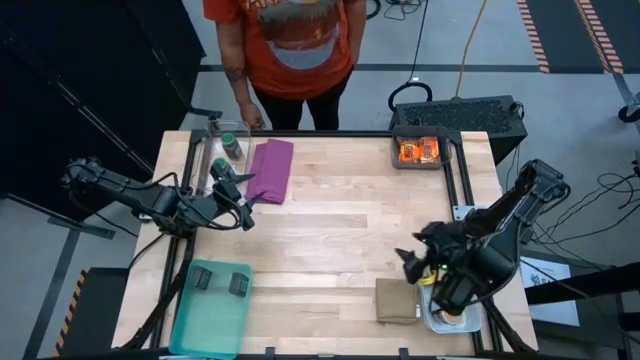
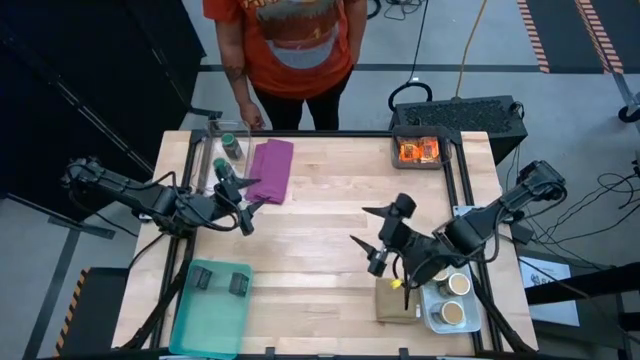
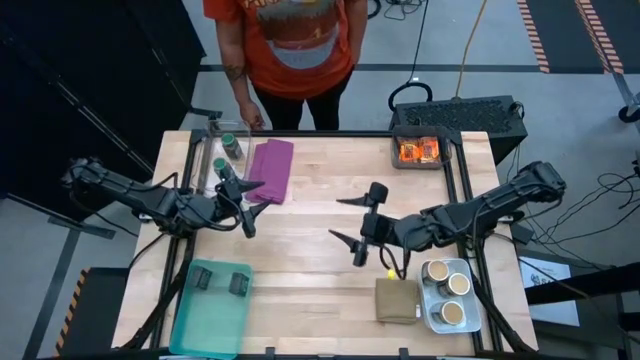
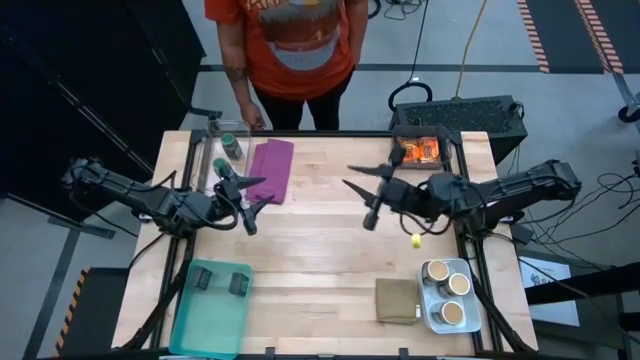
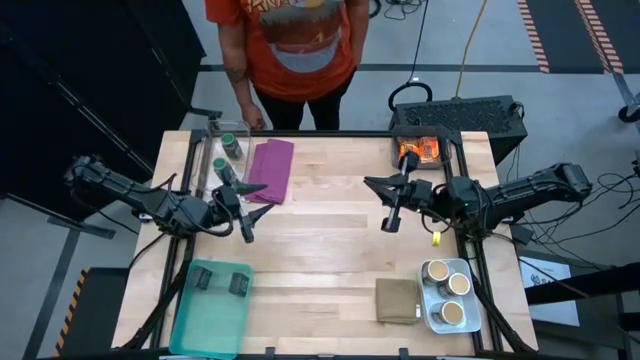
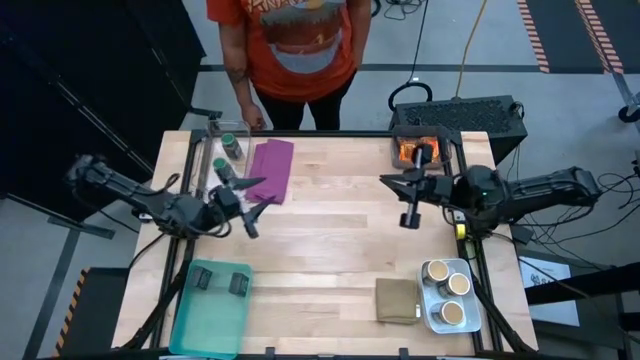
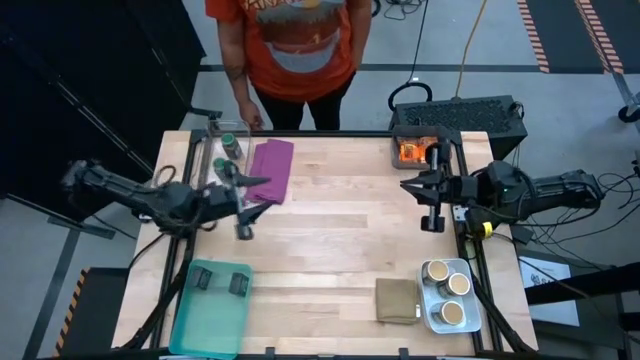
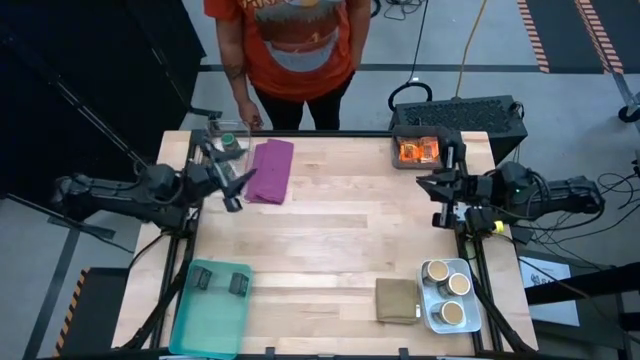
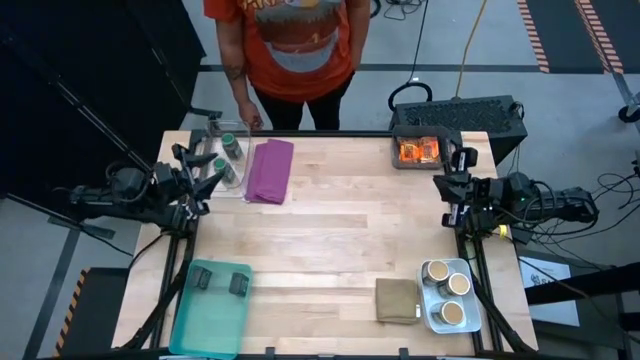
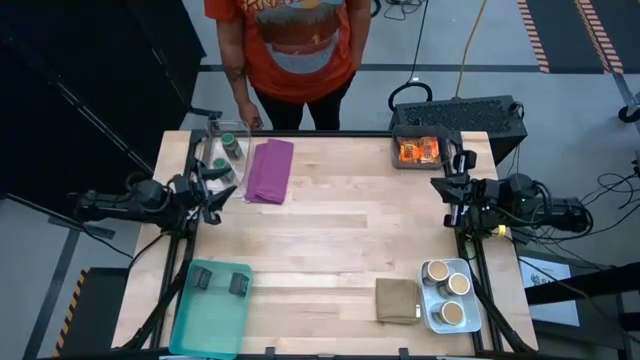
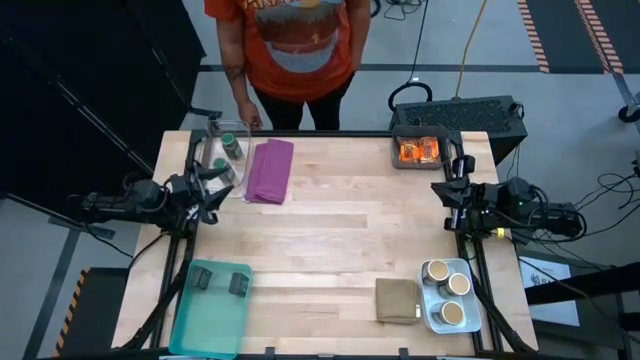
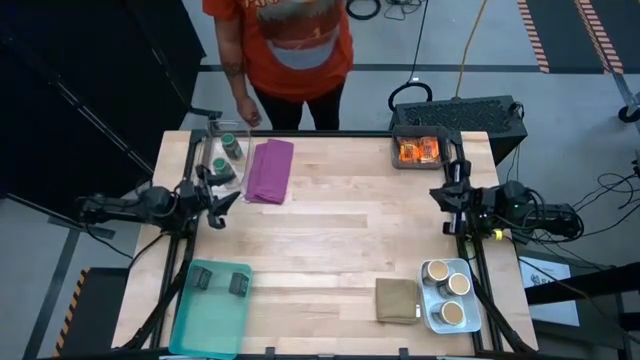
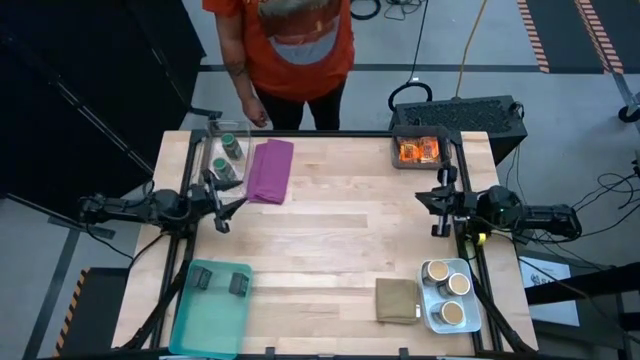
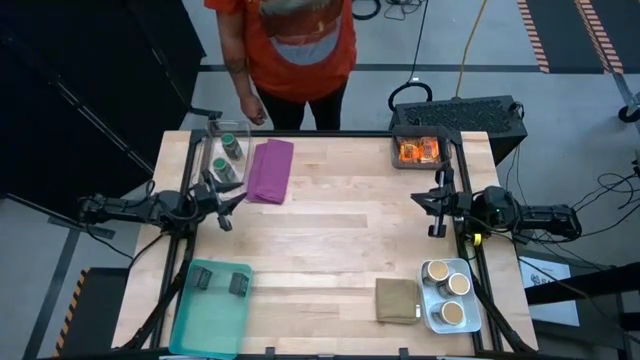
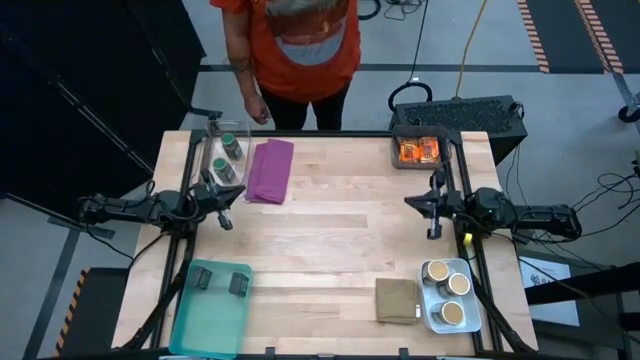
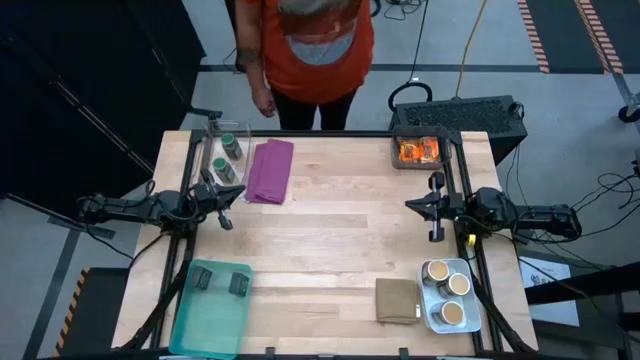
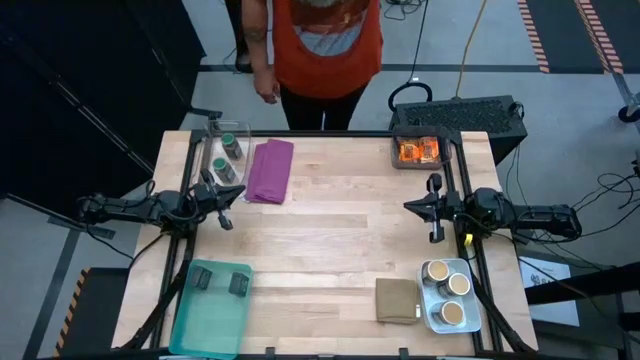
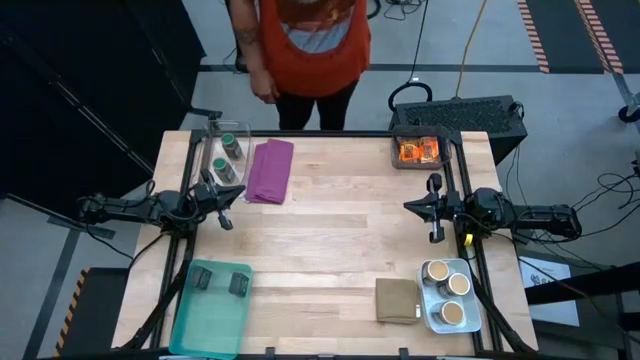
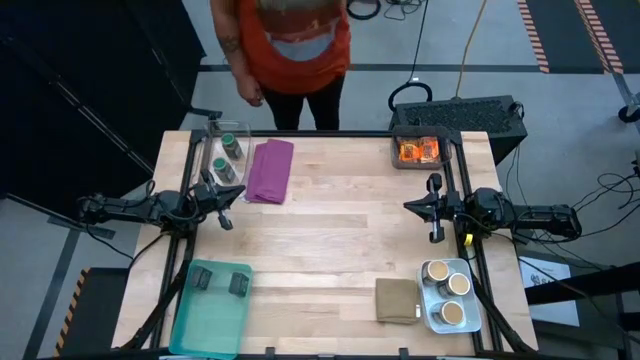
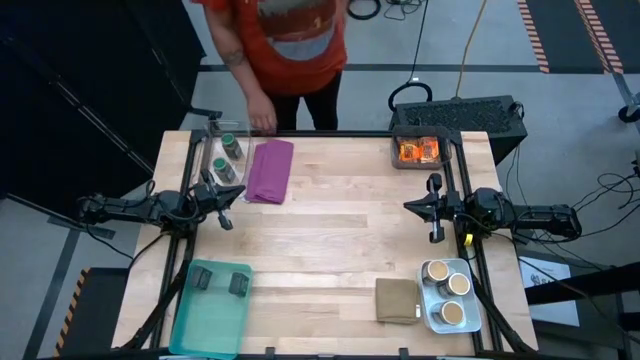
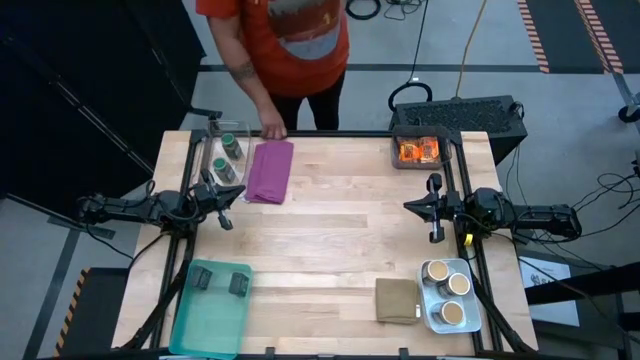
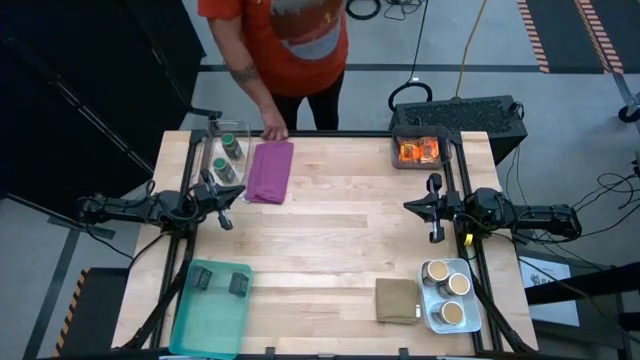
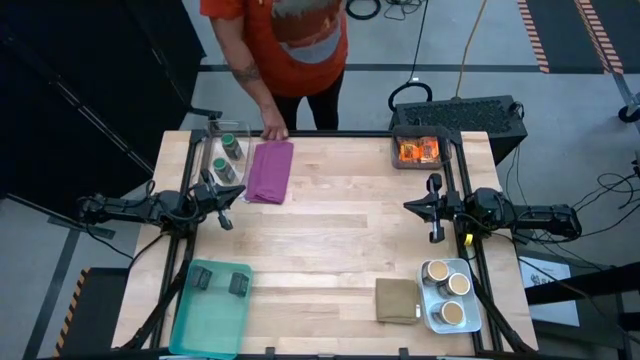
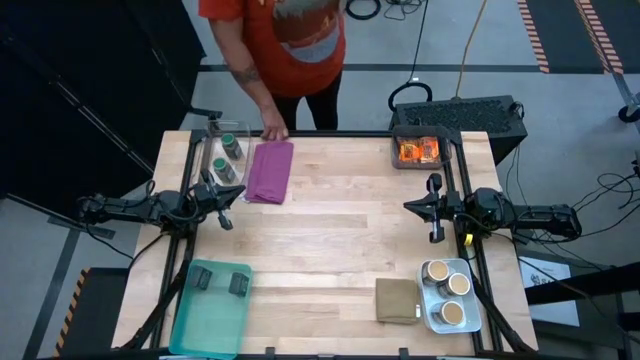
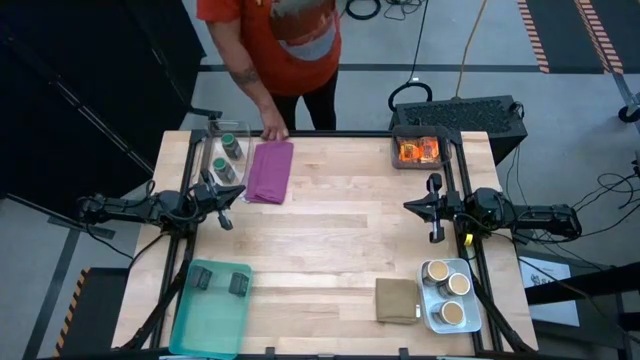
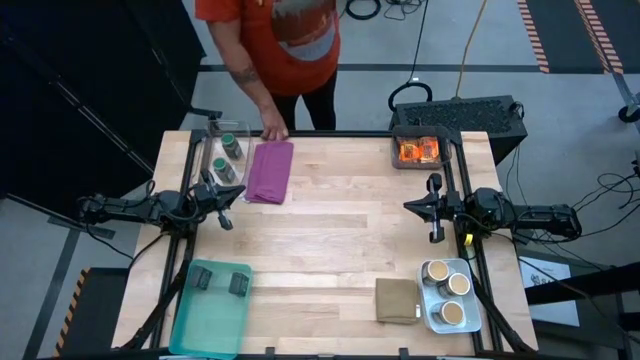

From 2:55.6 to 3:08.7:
Task: Sort spices by type
Return to Home Position

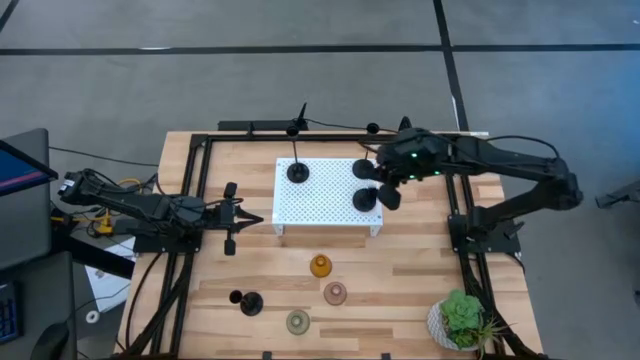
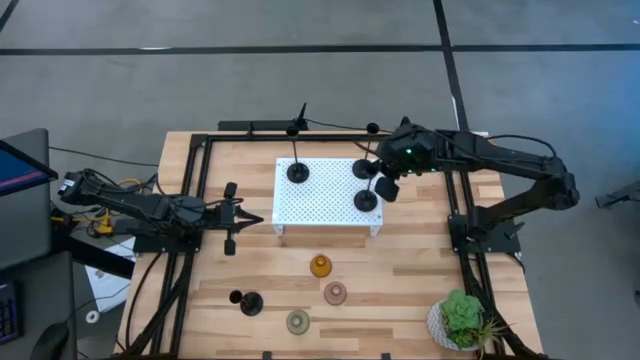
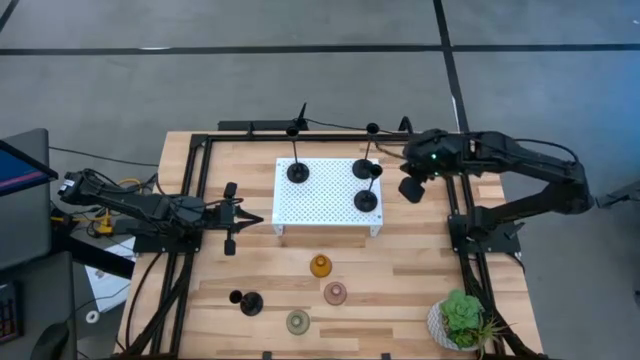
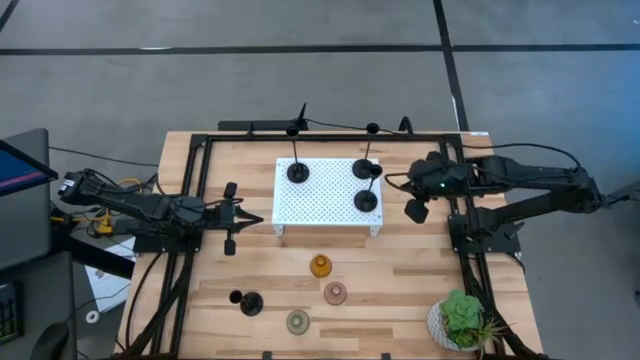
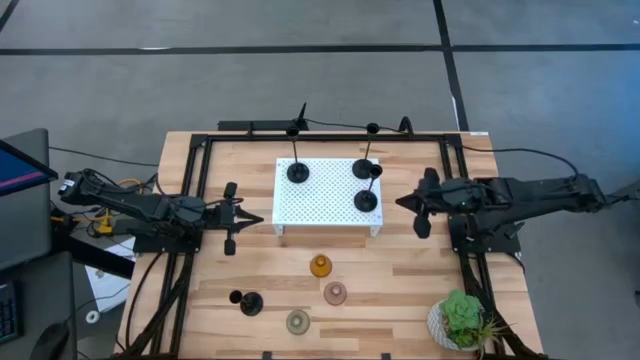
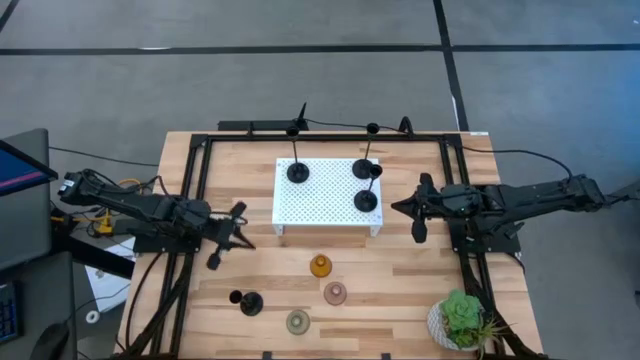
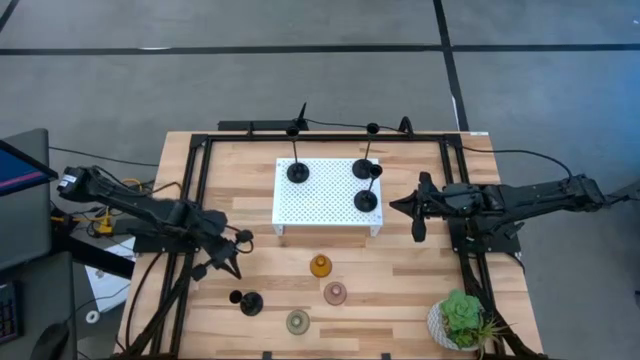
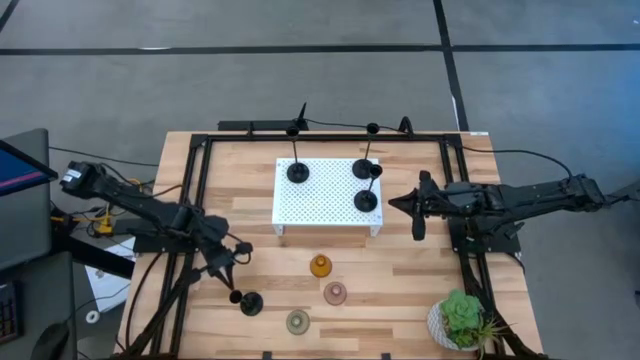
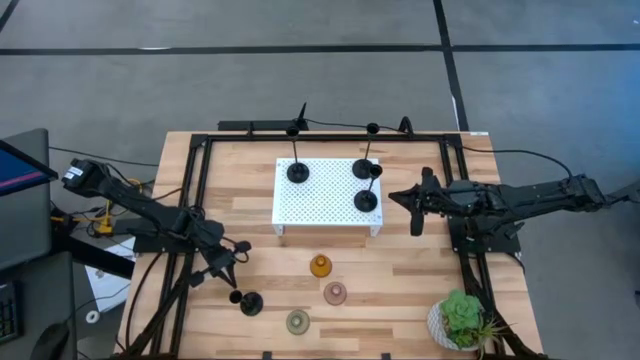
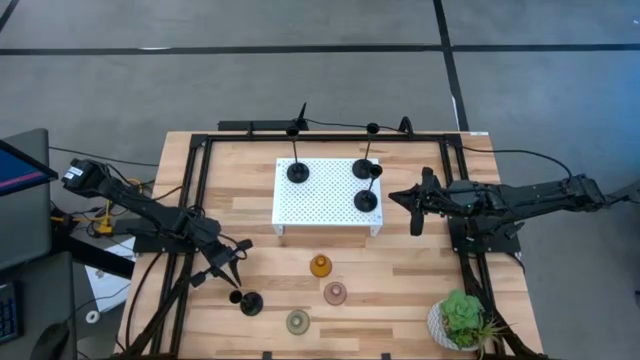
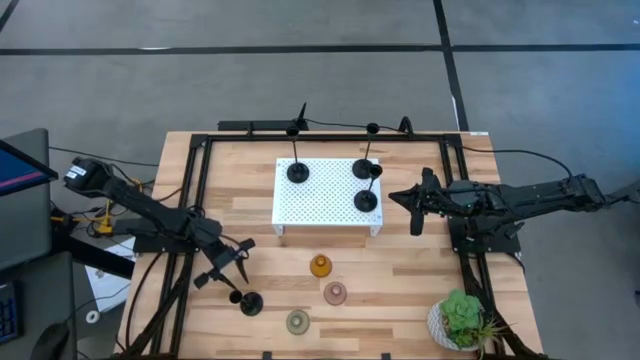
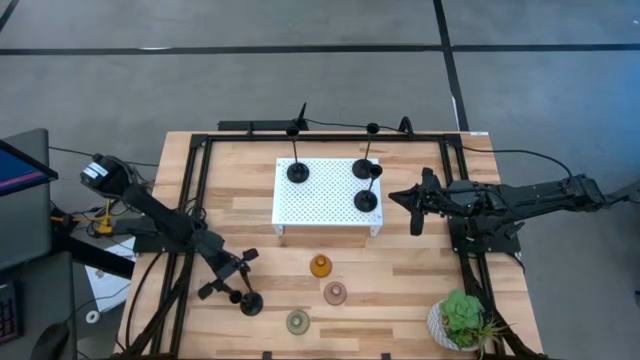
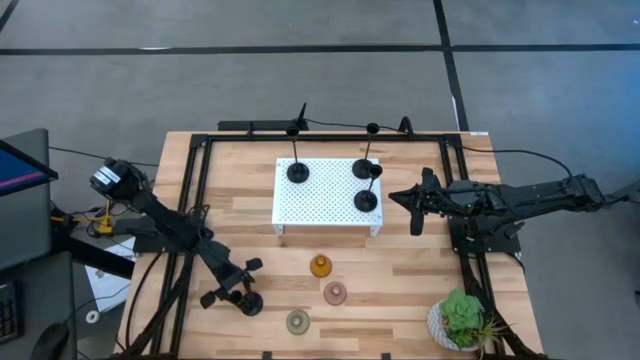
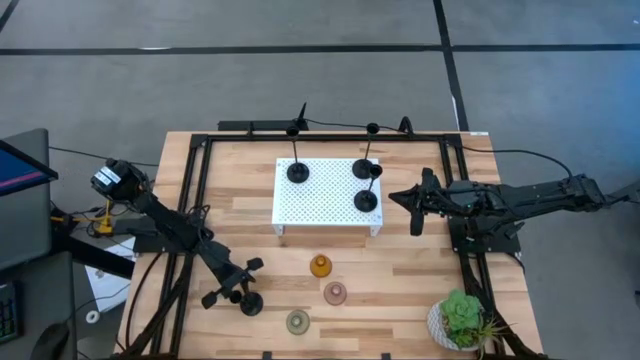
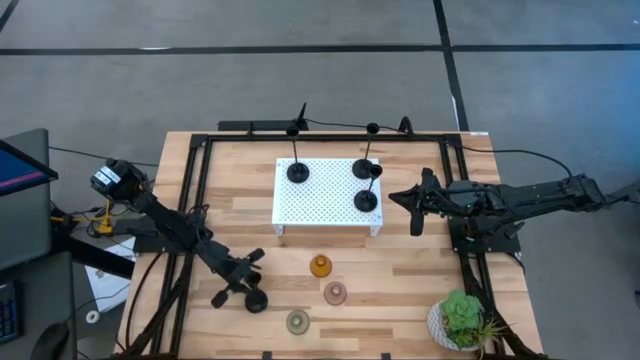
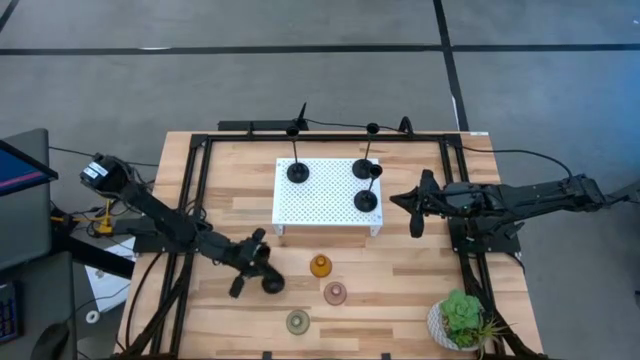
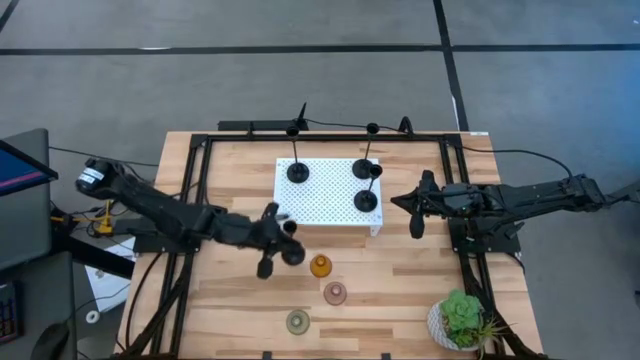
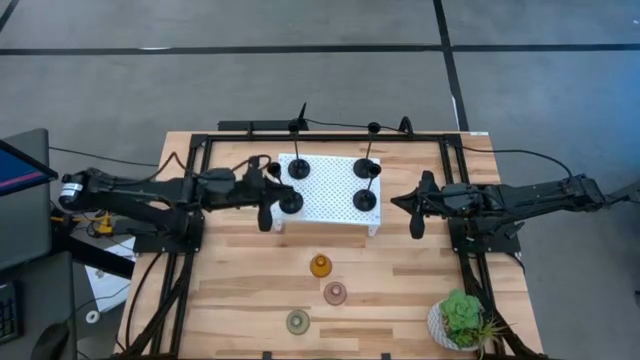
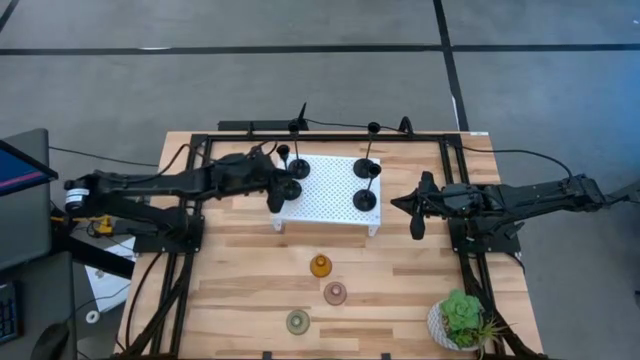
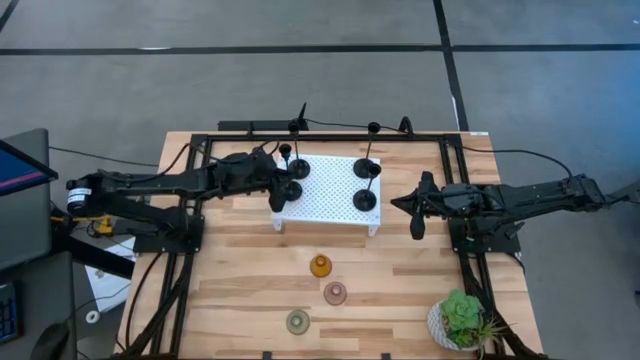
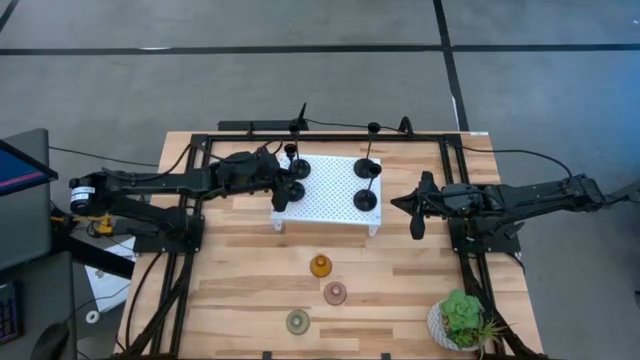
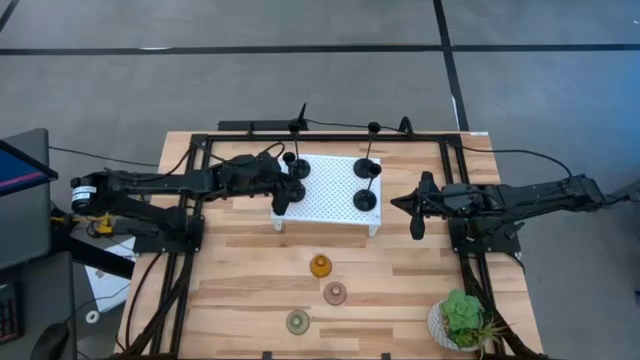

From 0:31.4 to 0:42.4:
Task: Pick & Place candle stick holders
Align the black candle holder with the other black candle holder on the shelf
